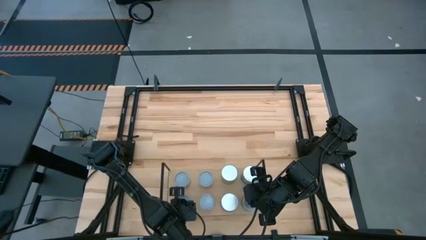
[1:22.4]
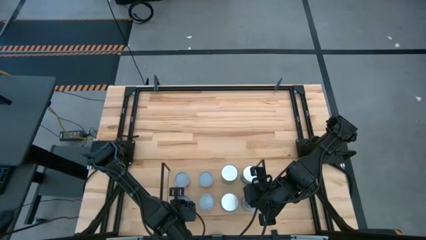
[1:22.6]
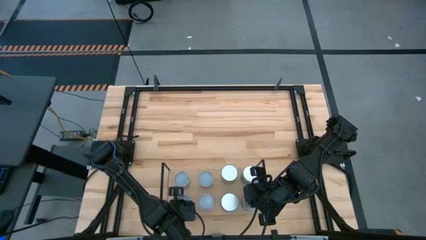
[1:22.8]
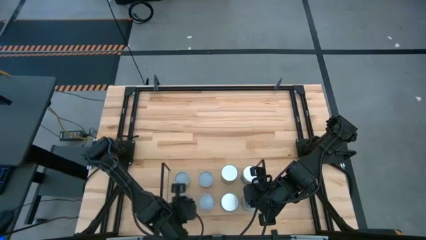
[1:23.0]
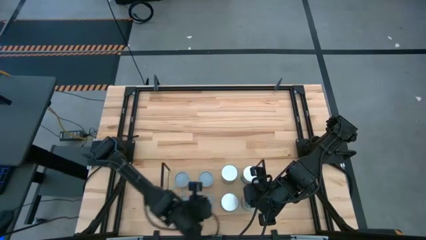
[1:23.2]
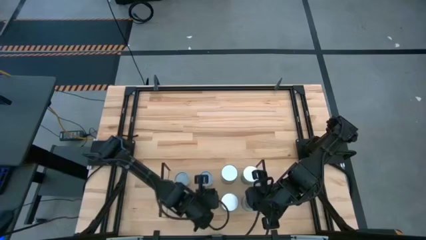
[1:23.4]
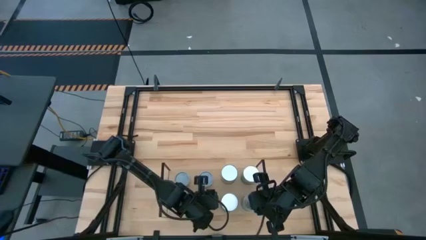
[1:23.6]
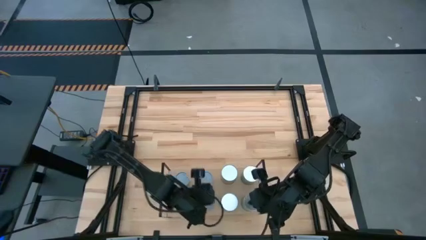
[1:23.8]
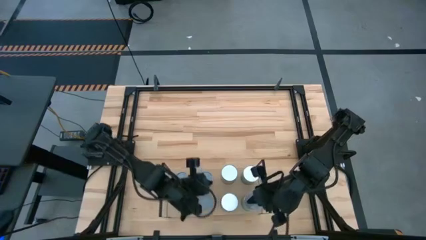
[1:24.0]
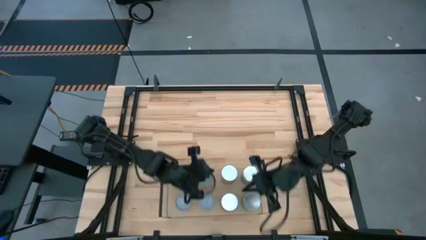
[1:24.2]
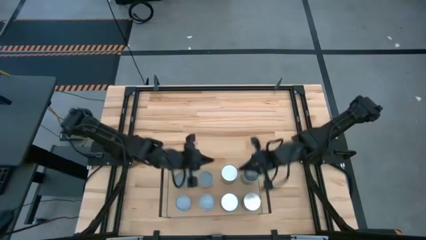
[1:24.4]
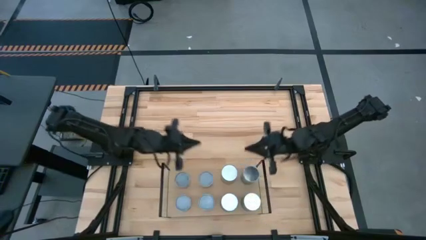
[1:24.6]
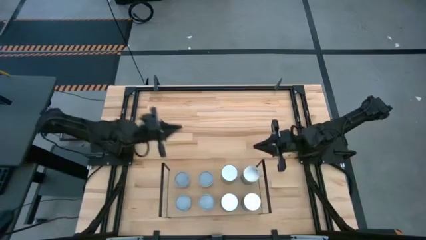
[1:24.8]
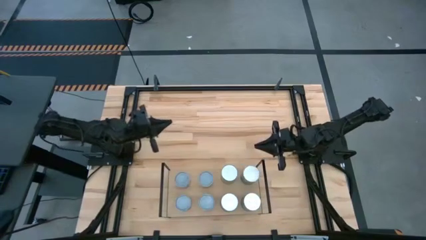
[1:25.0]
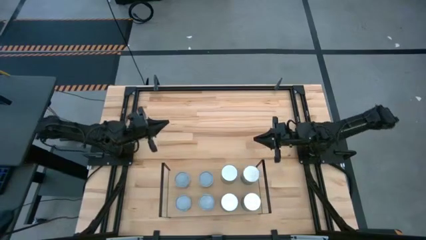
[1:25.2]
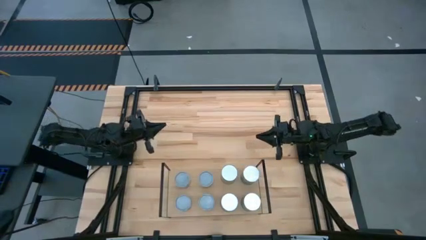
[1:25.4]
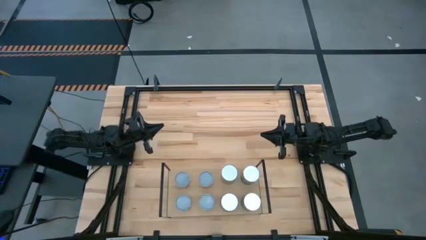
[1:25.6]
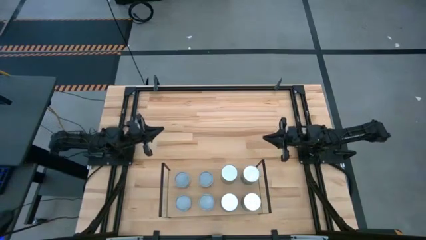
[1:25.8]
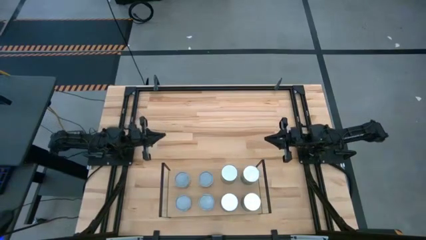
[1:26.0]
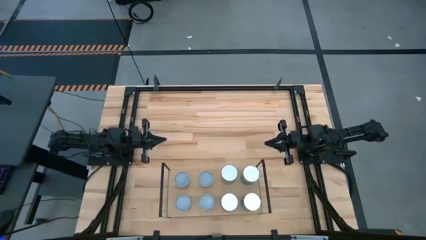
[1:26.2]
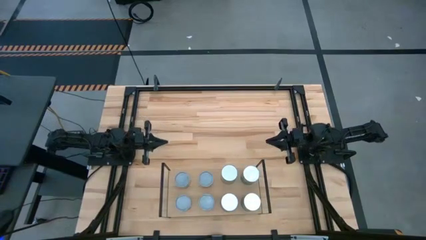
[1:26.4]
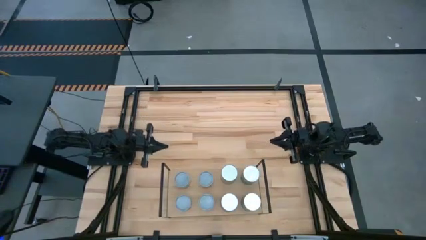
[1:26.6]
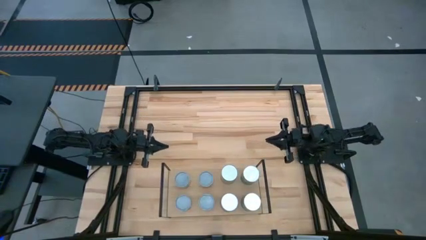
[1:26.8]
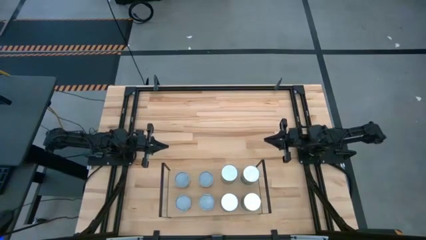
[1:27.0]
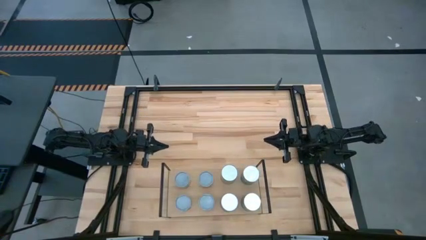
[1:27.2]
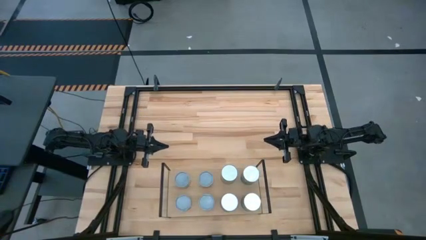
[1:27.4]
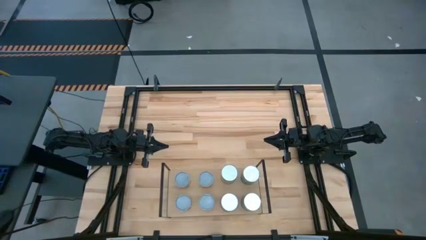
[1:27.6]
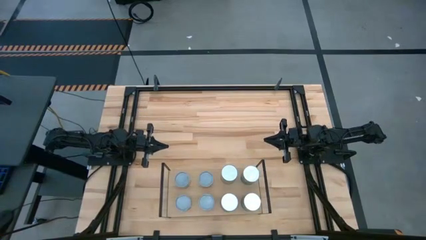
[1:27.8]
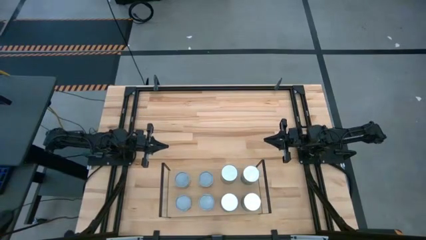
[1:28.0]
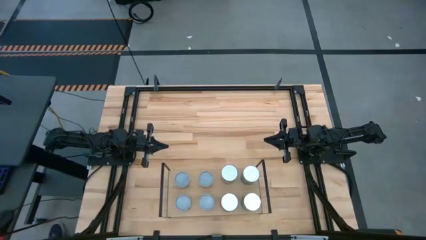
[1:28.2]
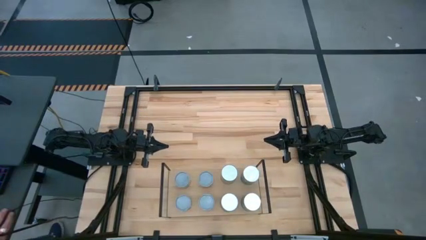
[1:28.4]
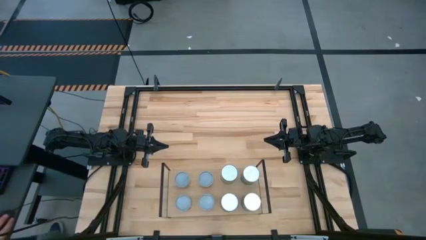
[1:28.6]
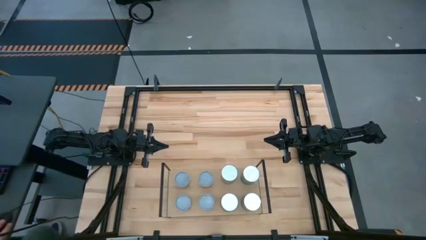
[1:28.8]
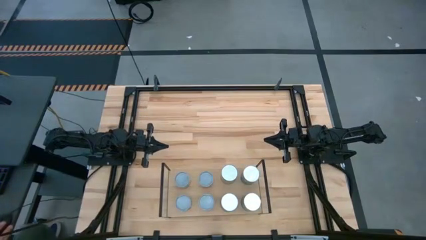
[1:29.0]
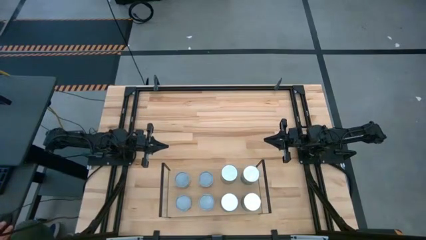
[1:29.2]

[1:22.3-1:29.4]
Task: Pick and place cans onto a shelf
Return to Home Position

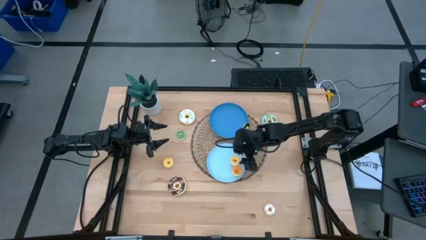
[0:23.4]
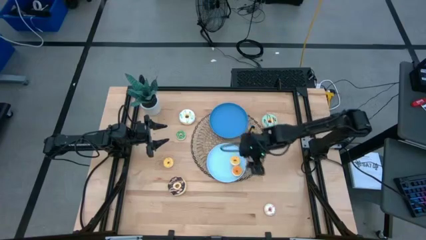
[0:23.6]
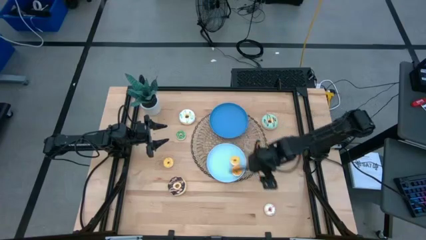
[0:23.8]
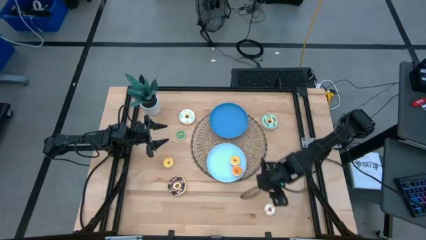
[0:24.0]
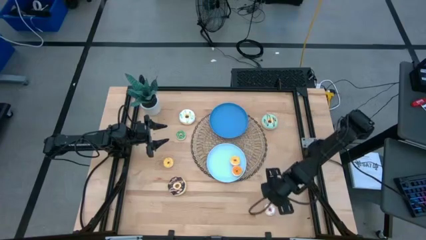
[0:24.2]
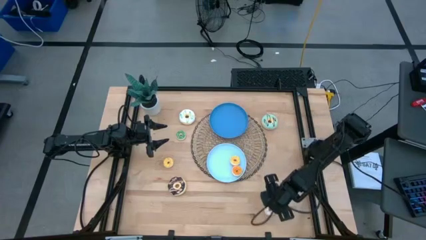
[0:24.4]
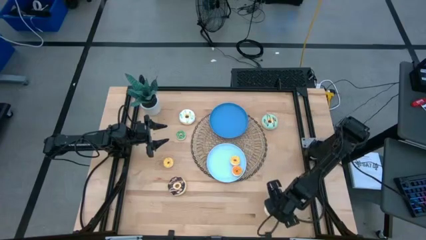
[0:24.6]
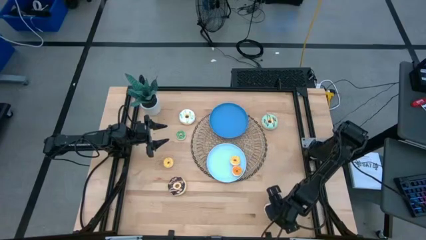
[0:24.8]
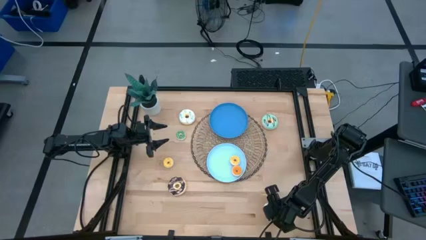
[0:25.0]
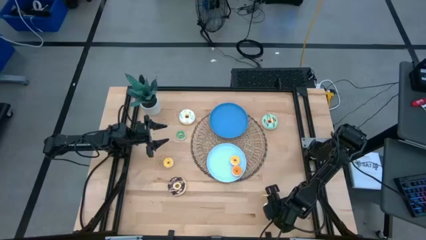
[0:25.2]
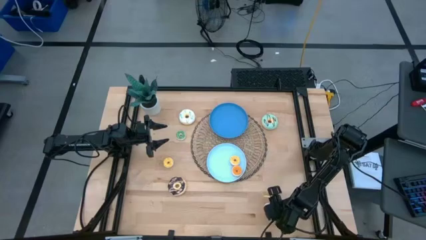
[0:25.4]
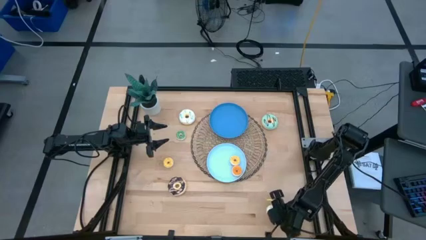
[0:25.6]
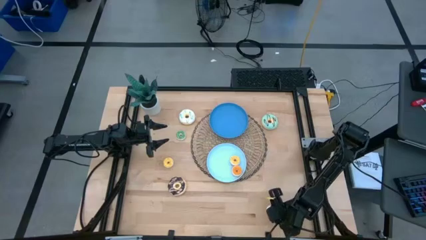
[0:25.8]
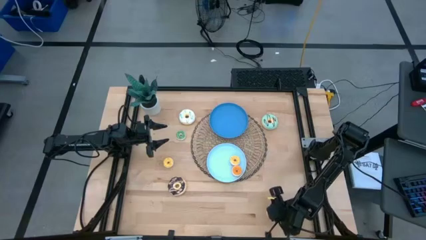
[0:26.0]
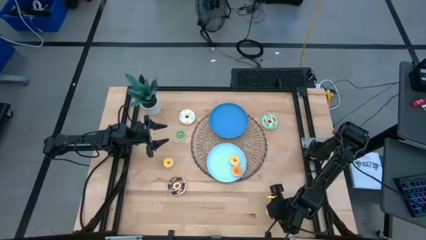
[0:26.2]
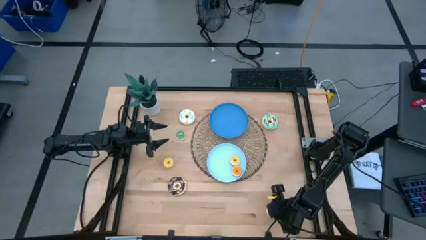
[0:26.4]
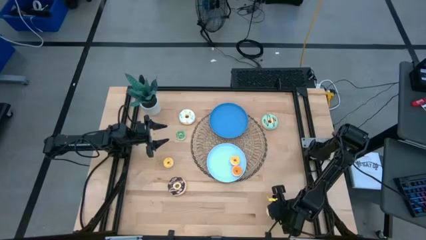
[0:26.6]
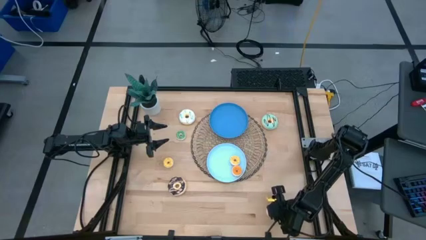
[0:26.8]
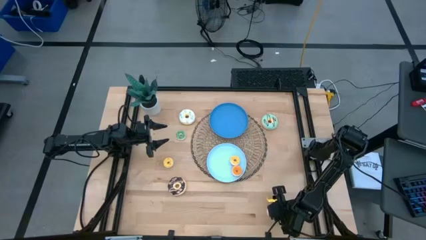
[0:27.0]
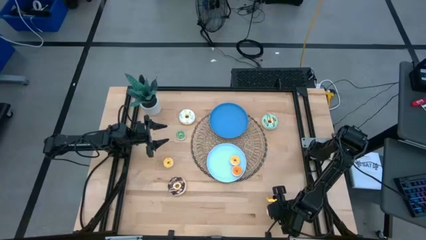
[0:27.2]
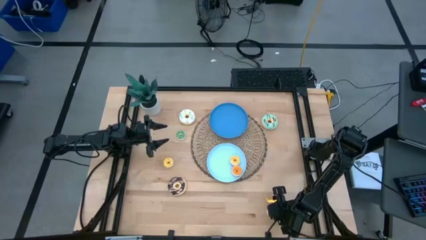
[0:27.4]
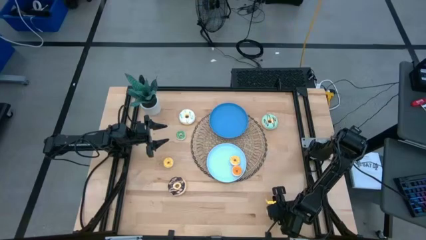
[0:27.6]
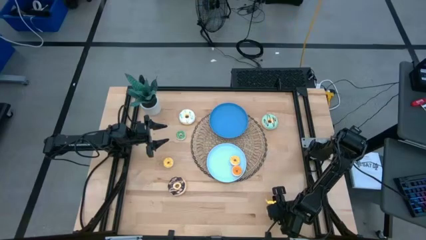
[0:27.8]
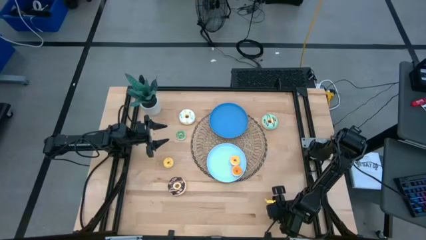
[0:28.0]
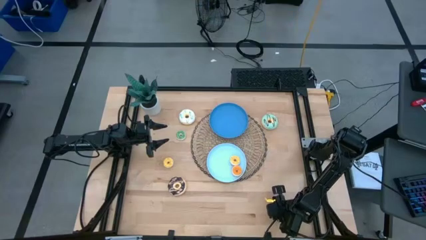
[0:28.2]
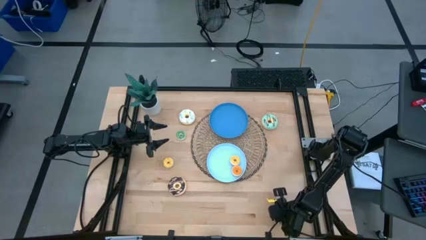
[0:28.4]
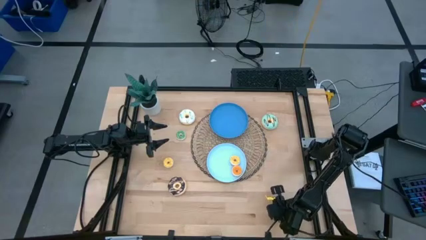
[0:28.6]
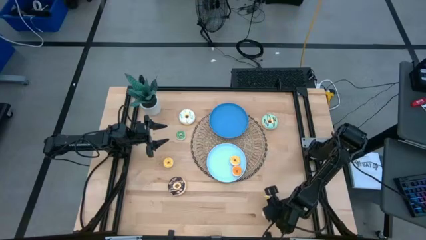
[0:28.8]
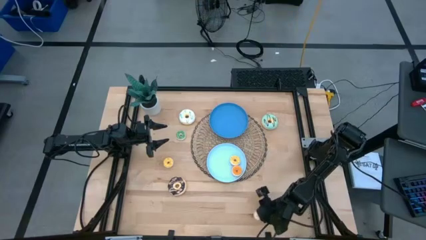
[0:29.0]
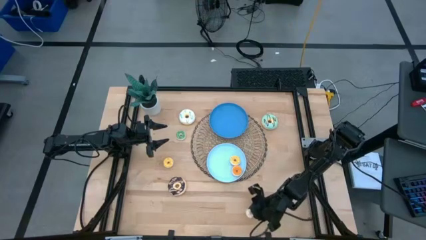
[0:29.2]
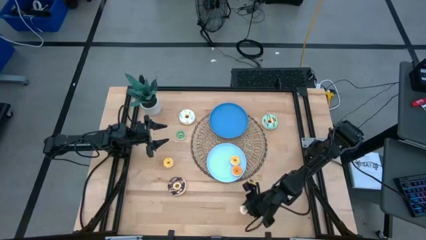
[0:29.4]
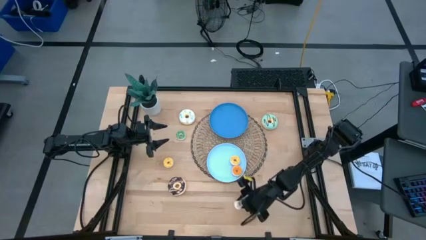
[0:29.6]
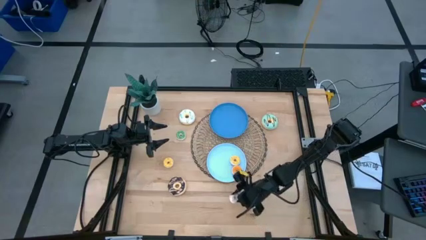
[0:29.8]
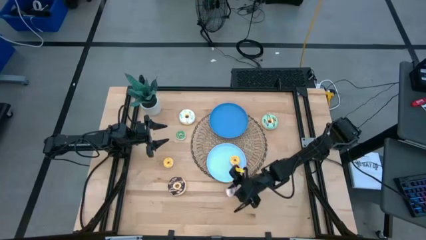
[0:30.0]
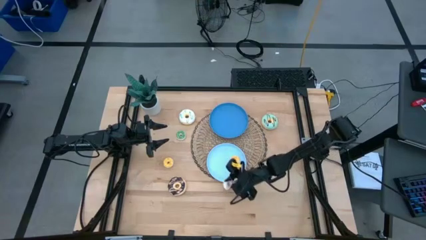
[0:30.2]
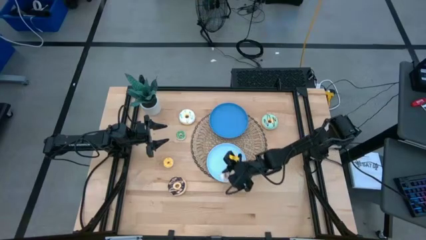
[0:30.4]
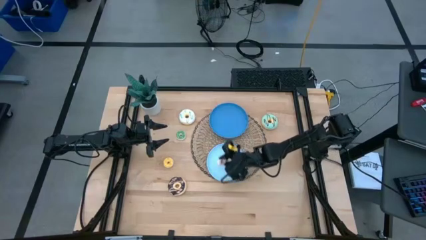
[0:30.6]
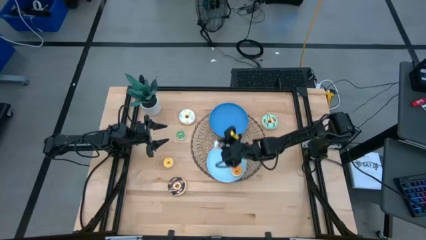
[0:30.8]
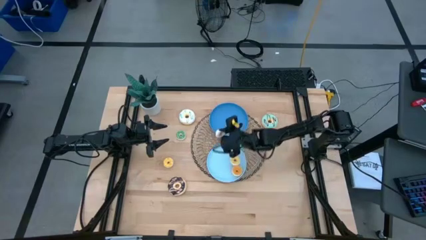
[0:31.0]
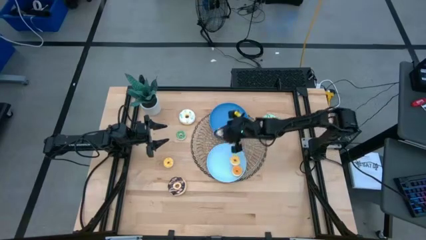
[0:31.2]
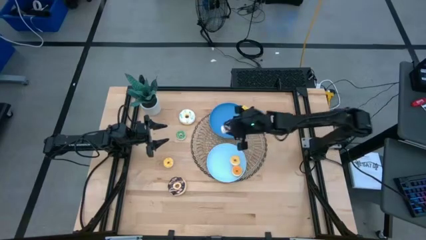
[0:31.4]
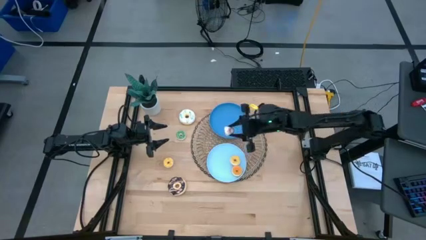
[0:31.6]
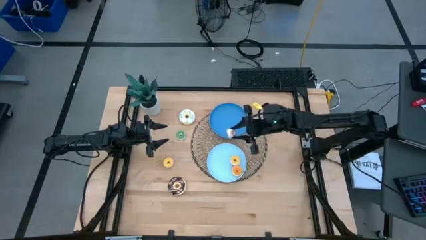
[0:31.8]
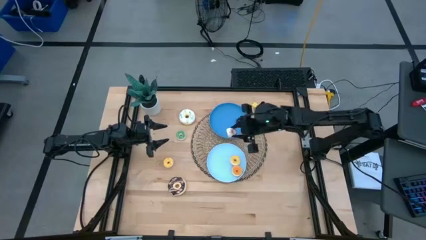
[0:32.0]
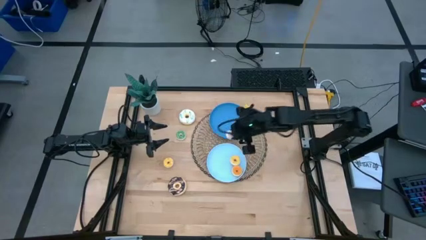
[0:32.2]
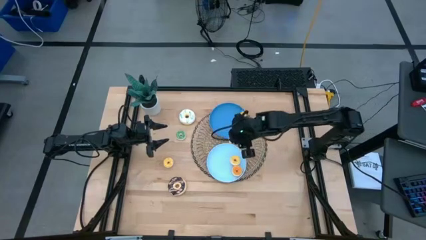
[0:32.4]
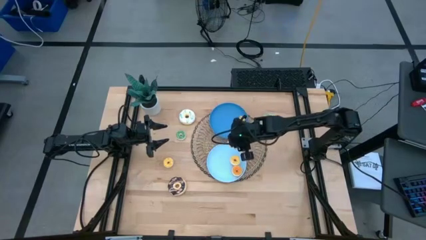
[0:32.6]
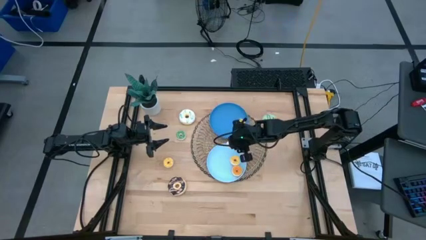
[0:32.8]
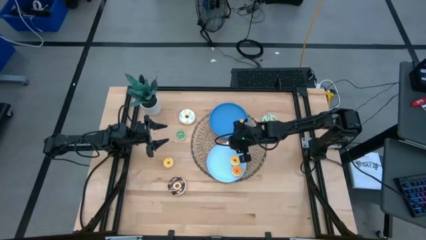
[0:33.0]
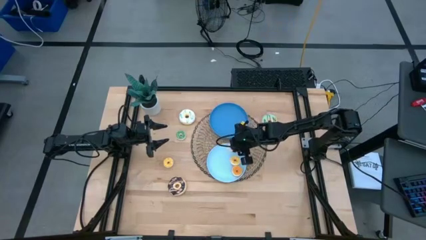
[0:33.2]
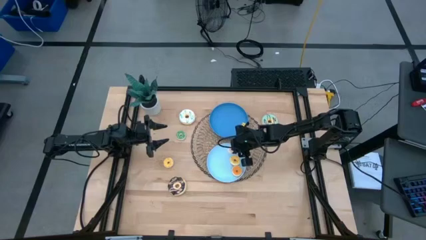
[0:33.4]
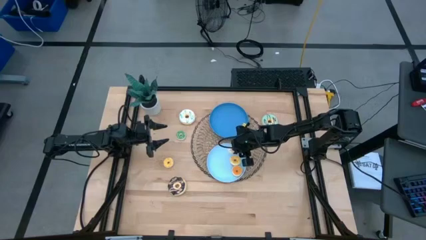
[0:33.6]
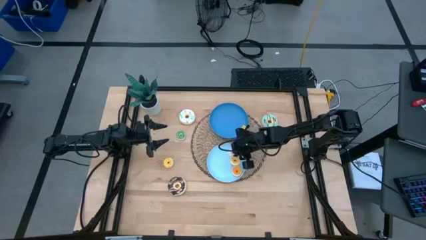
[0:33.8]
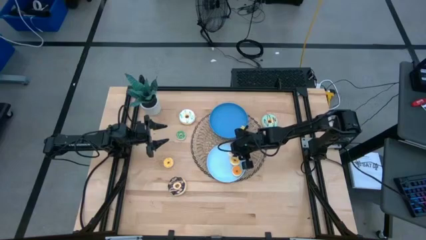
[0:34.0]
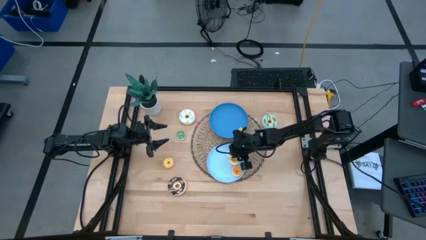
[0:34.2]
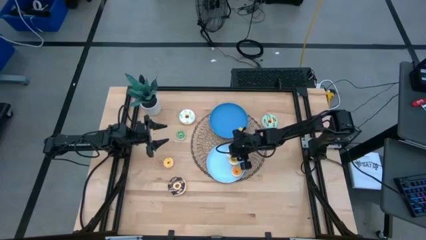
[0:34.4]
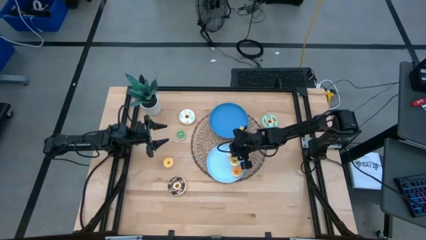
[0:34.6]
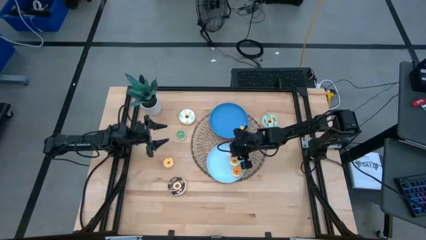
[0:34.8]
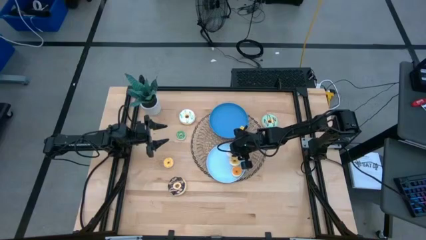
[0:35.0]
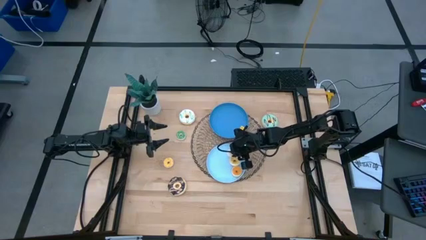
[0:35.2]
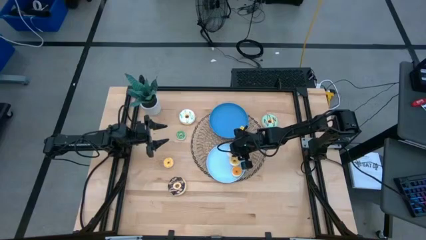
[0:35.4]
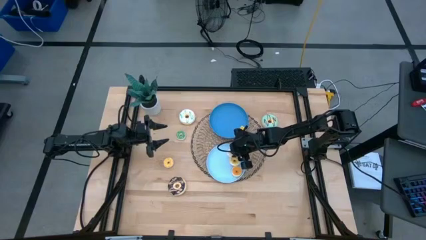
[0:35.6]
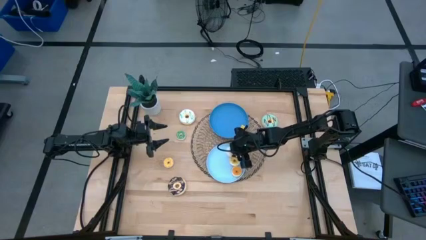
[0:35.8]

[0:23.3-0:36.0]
Task: Pick & Place donuts
Put the small white donut on the light blue plate
